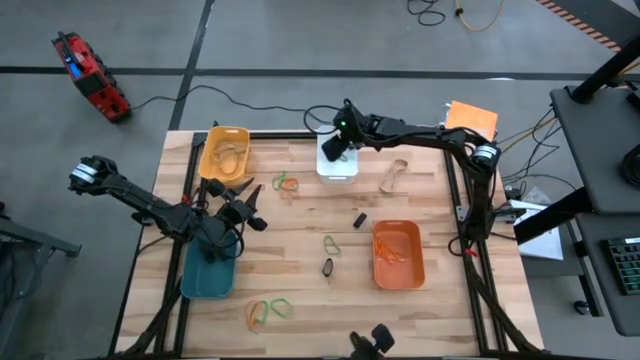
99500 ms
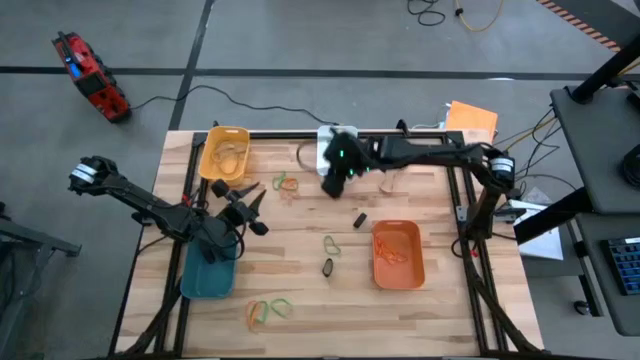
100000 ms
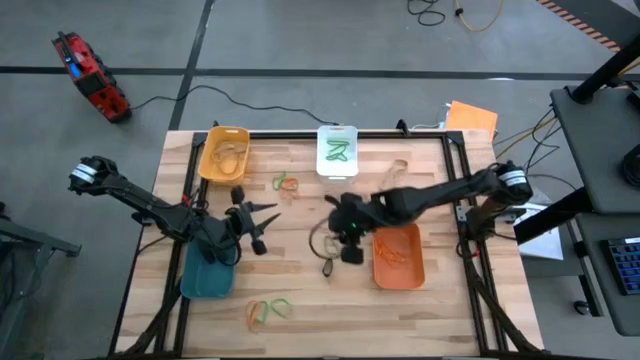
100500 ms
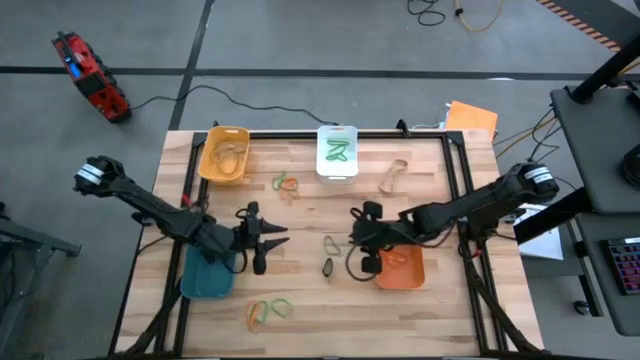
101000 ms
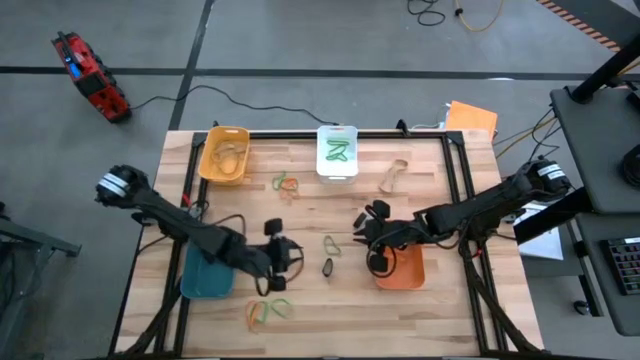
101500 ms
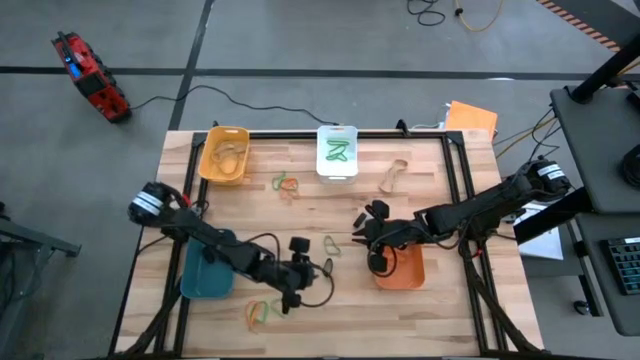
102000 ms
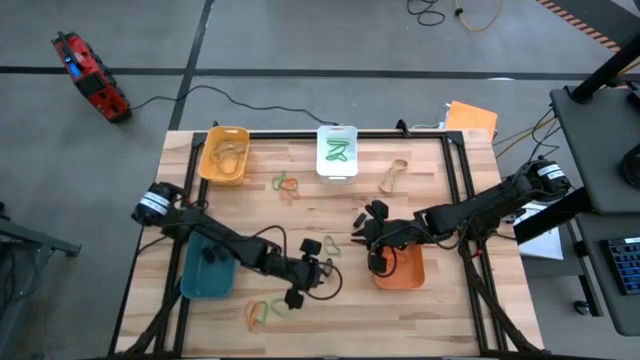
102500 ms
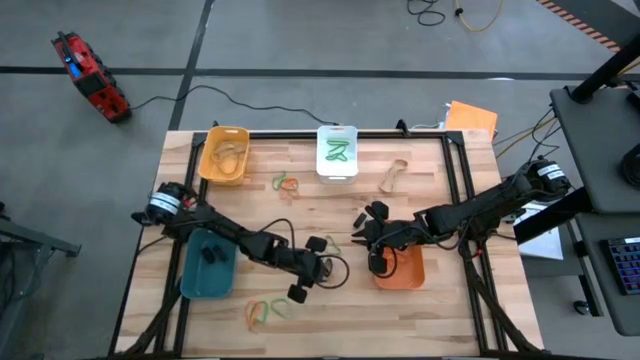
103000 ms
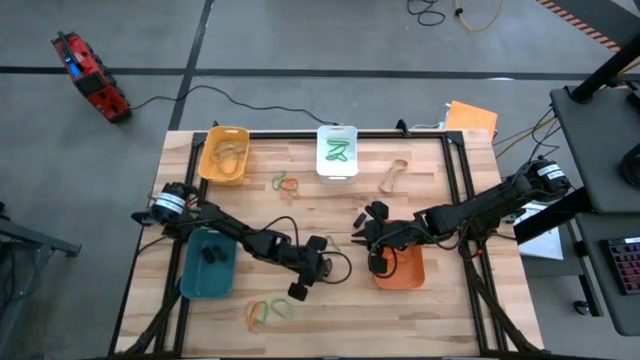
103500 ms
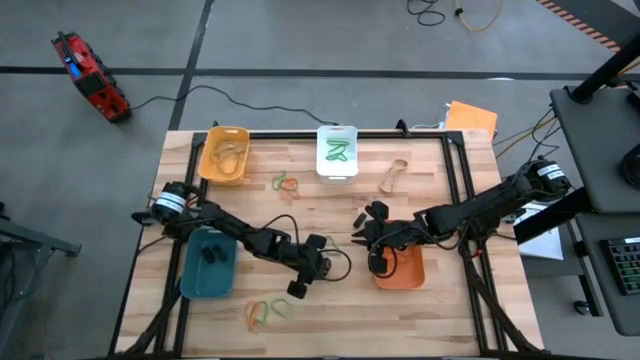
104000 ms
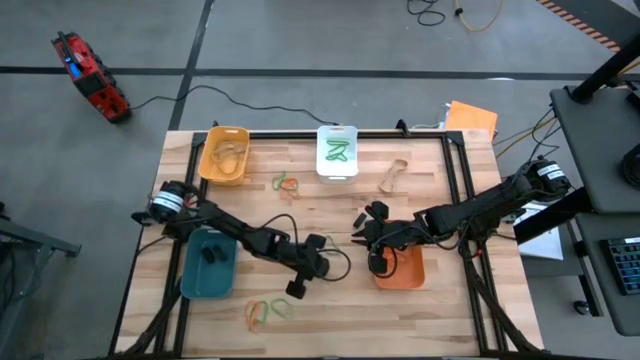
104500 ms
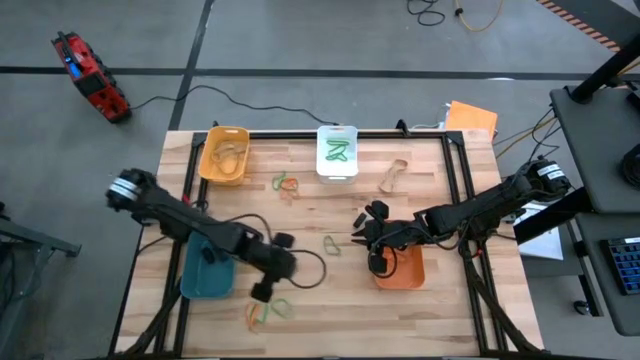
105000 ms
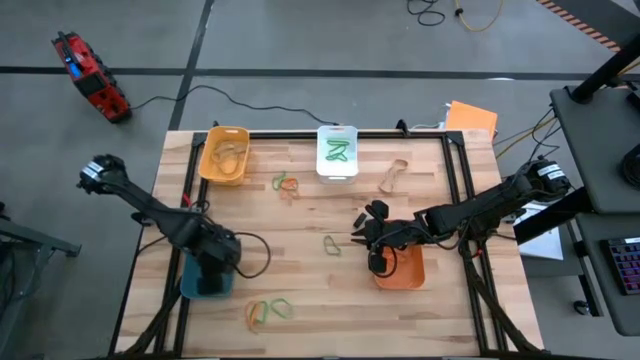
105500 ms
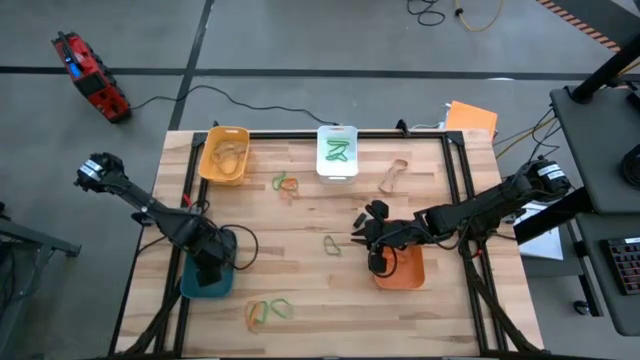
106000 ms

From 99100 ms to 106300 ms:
Task: Sort rubber bands into baskets
Put the black rubber band into the blue bin

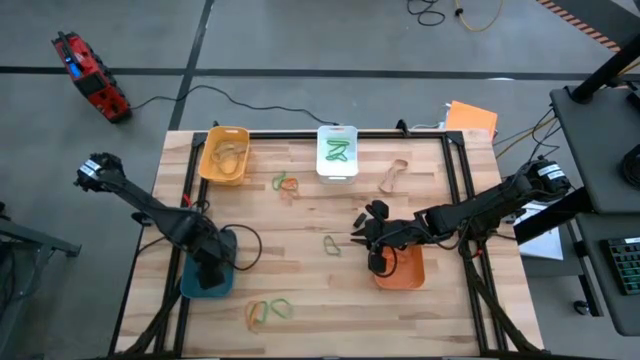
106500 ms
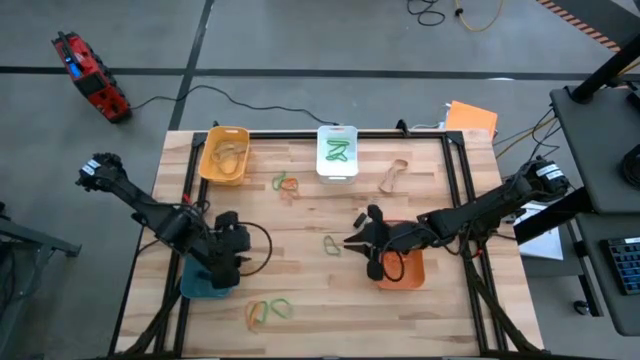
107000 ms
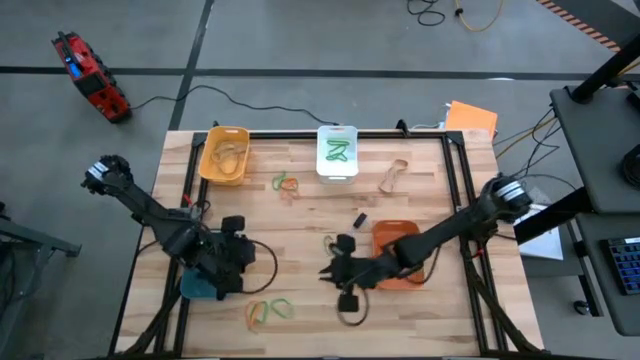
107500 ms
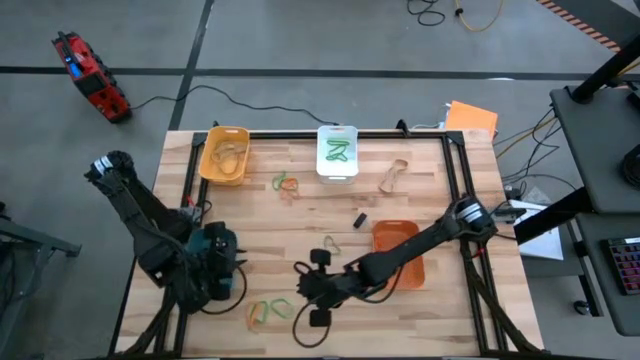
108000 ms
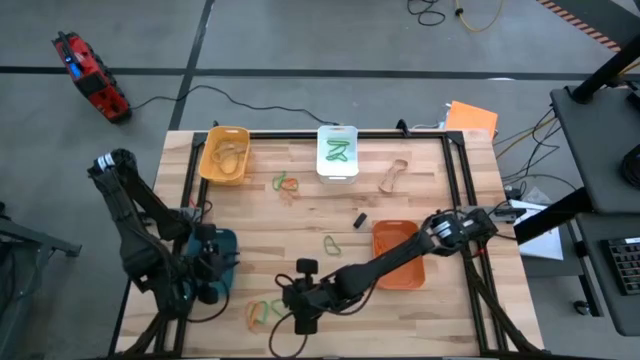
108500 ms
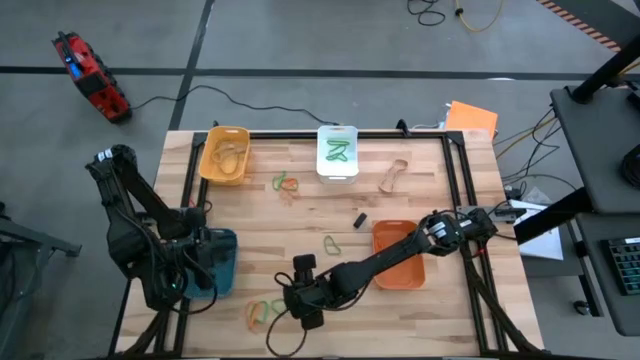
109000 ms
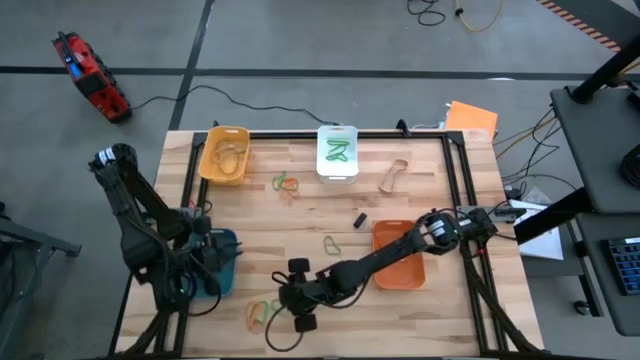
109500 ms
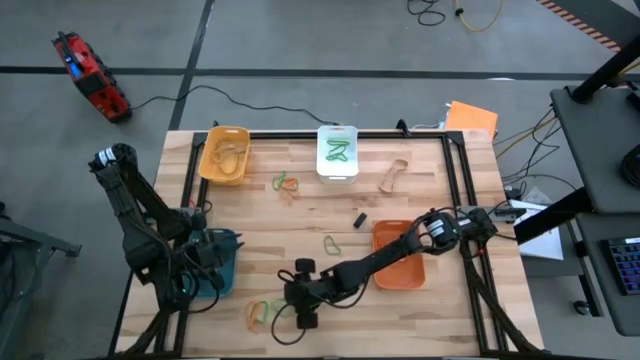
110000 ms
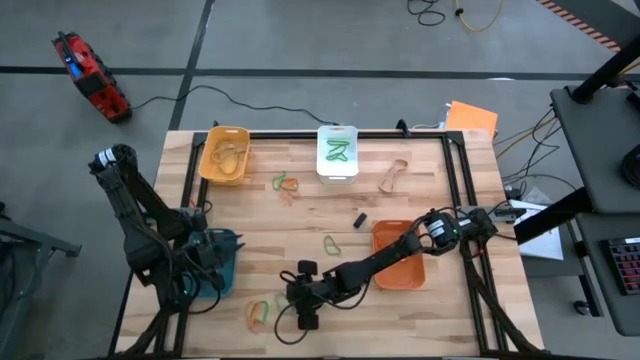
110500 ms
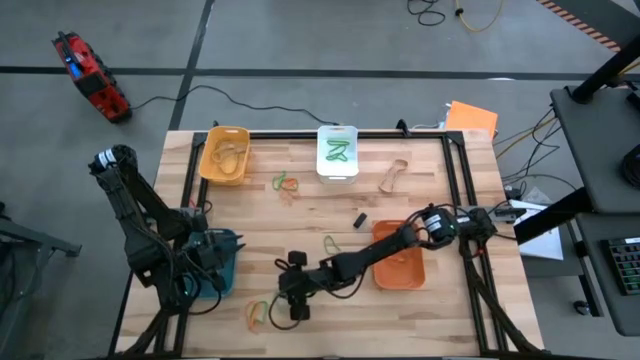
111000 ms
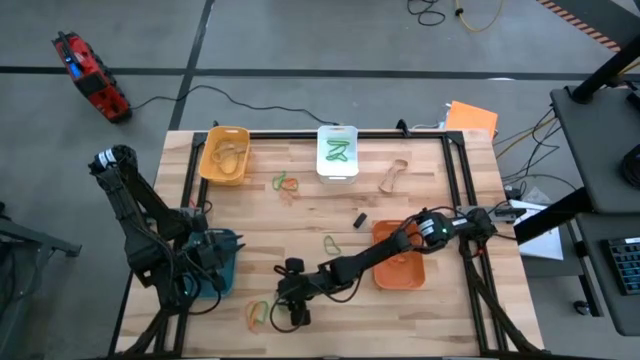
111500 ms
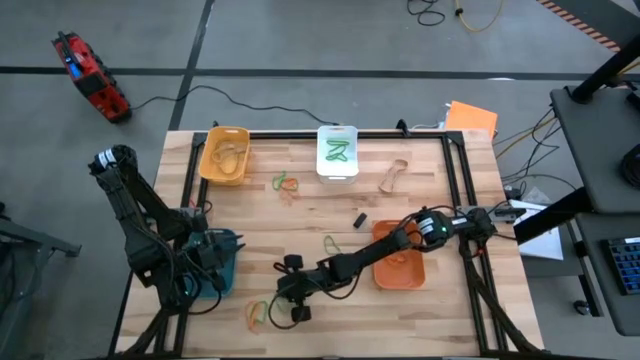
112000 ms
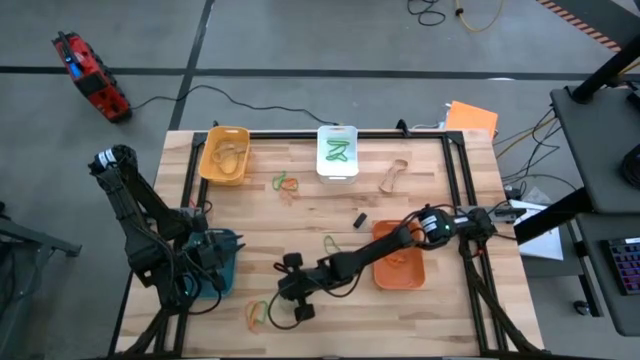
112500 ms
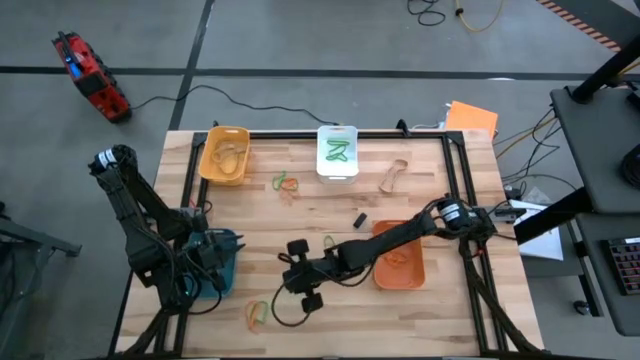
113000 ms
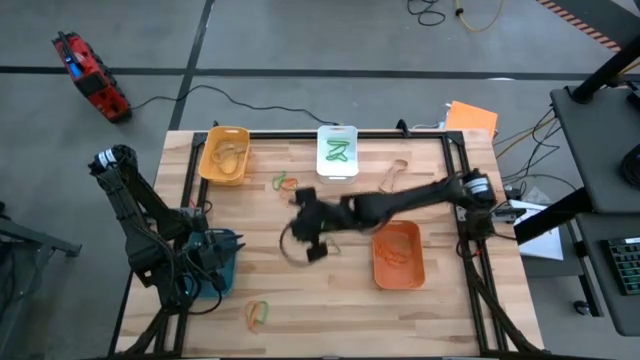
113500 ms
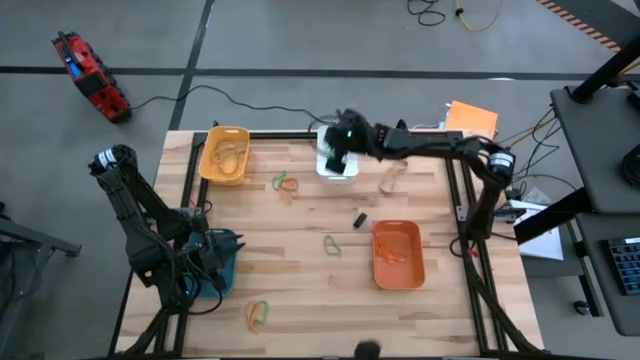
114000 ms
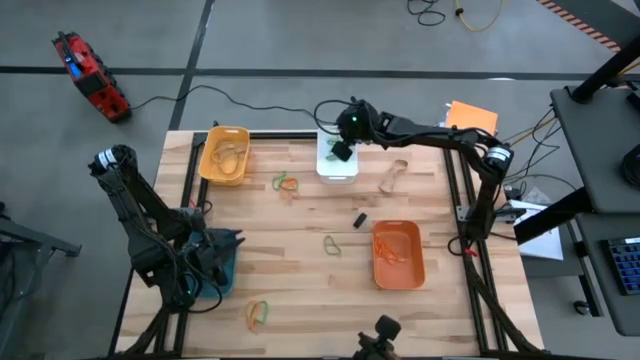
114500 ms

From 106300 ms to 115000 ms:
Put the green rubber band into the white bin

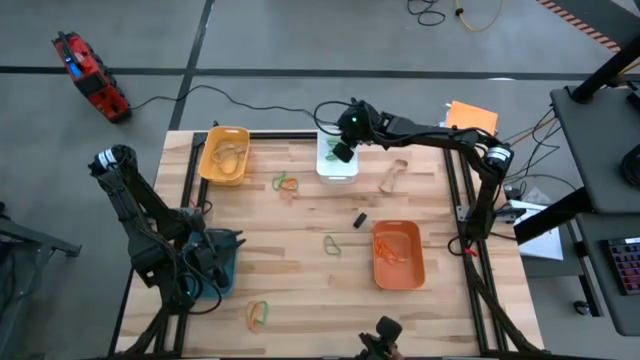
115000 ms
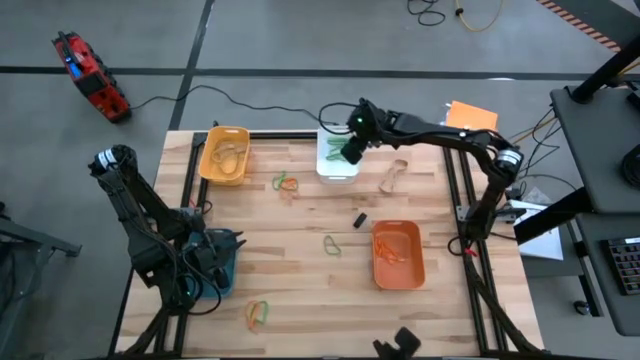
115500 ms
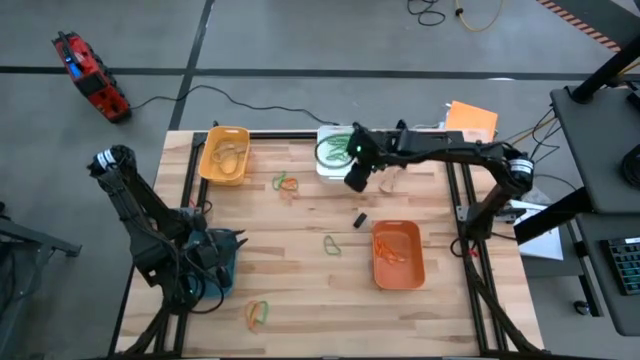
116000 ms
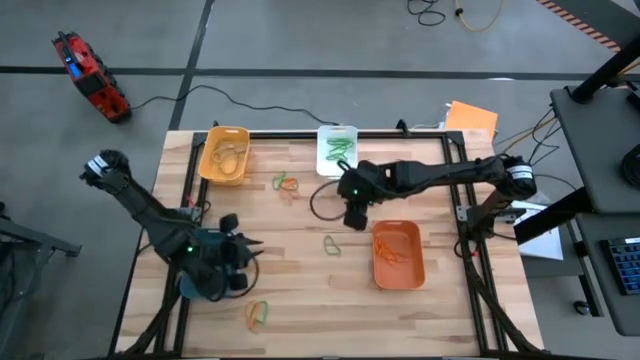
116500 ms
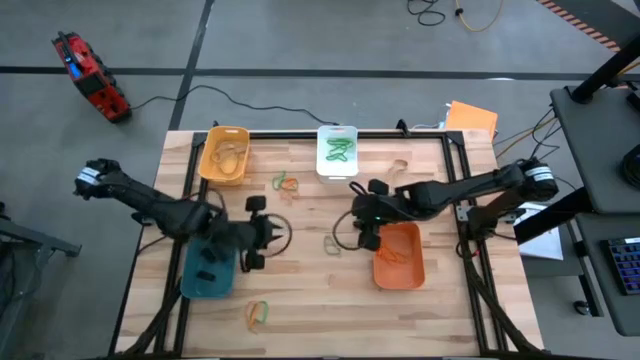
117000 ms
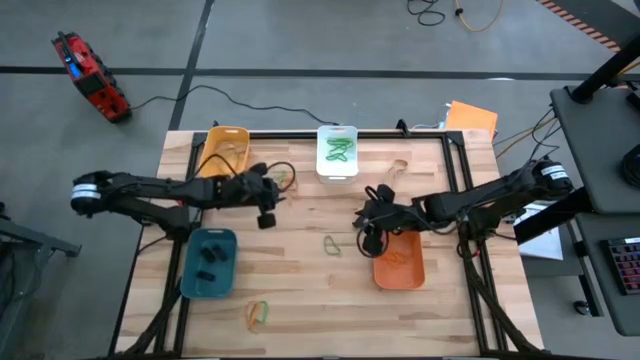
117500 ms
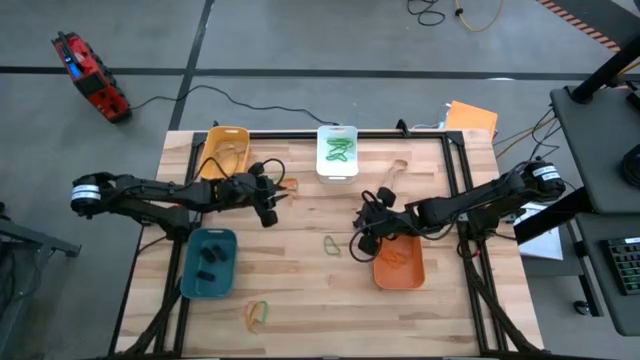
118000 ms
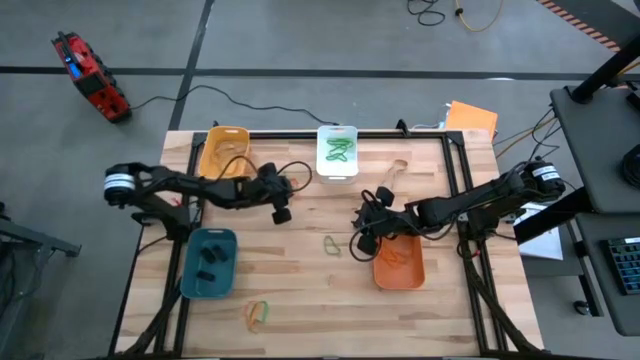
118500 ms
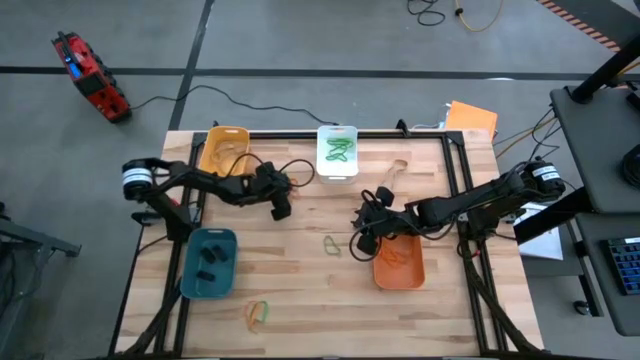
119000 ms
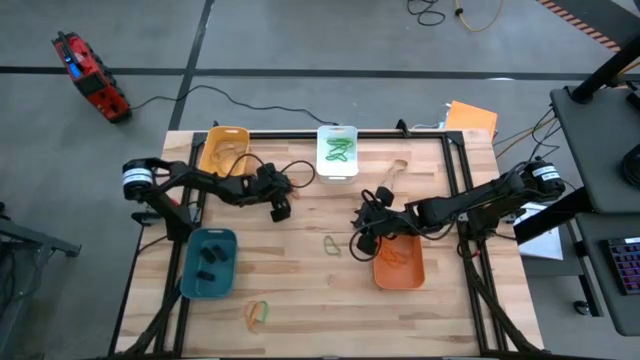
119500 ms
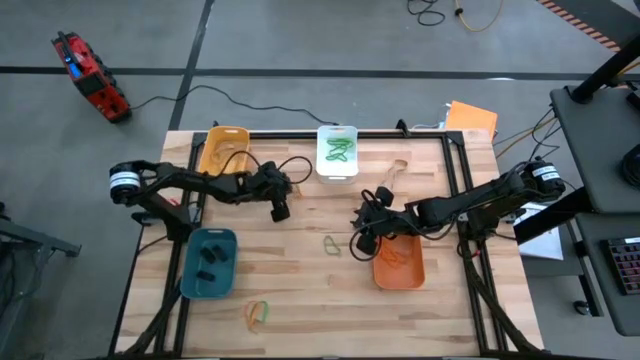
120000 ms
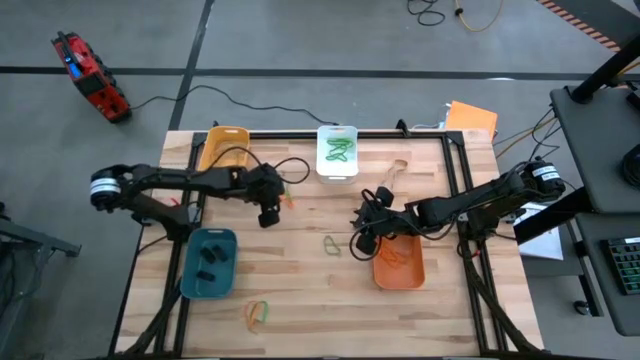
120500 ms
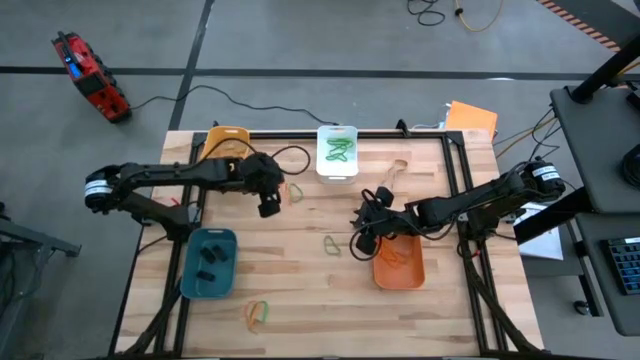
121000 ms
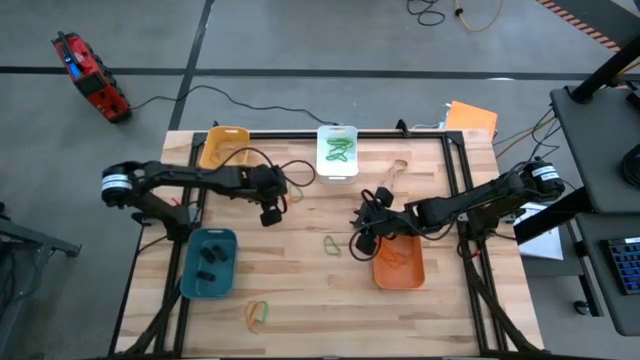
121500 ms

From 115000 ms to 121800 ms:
Put the orange rubber band into the orange bin
